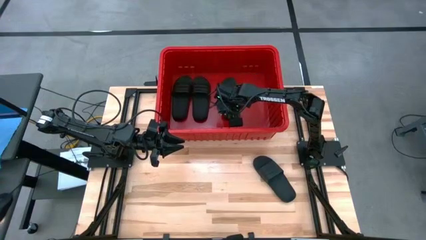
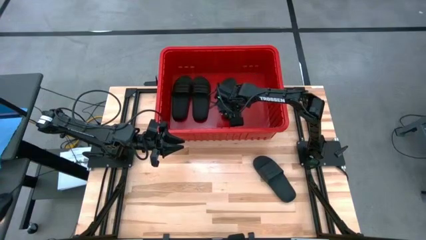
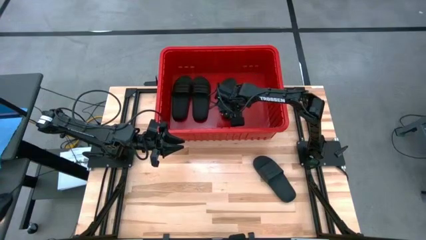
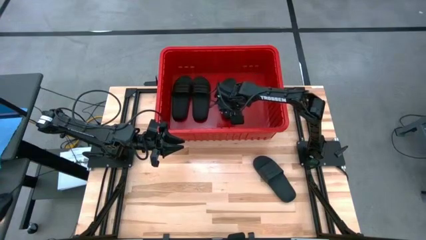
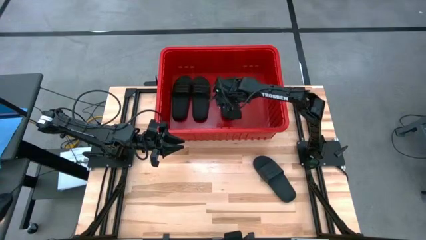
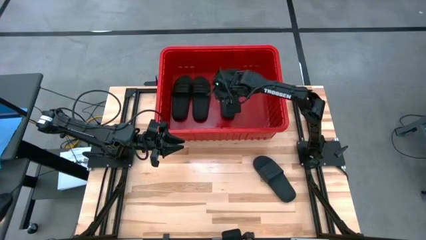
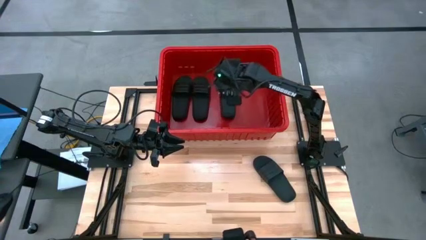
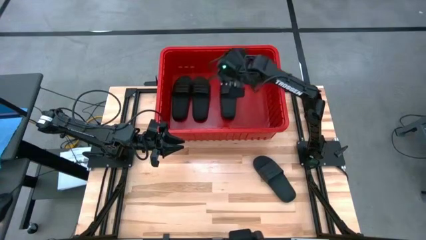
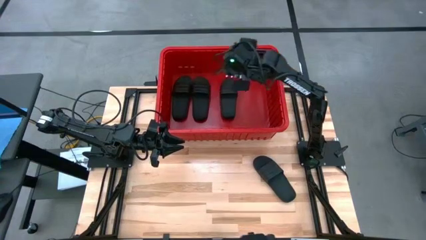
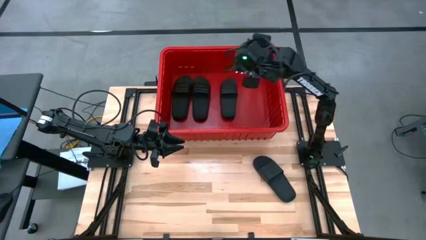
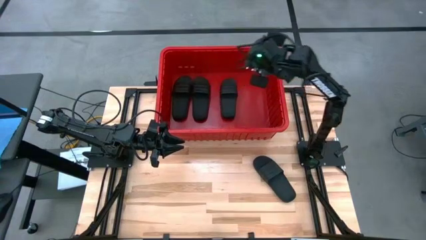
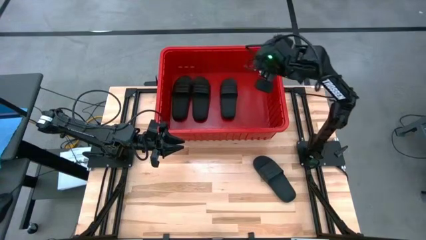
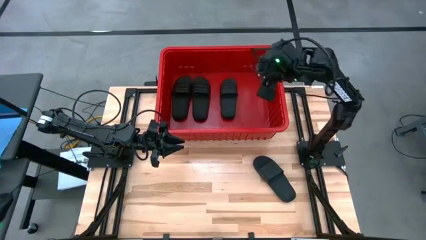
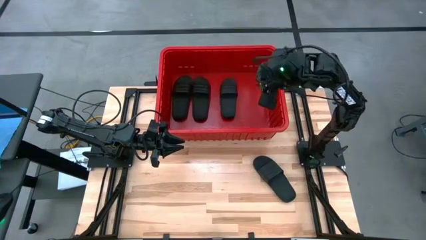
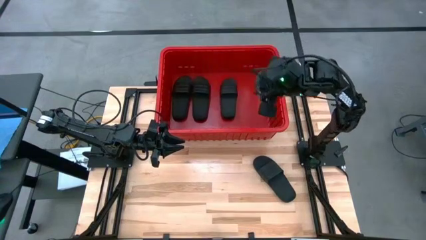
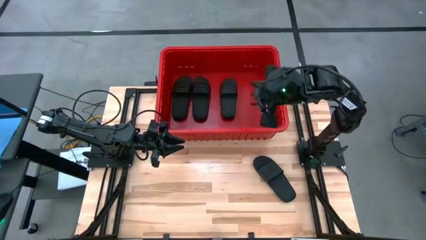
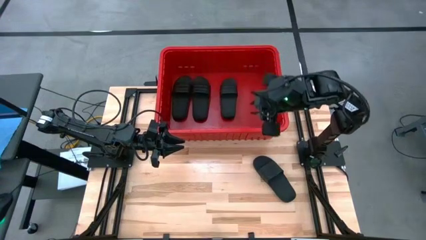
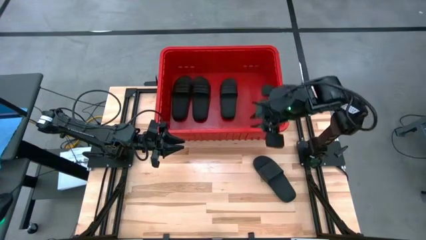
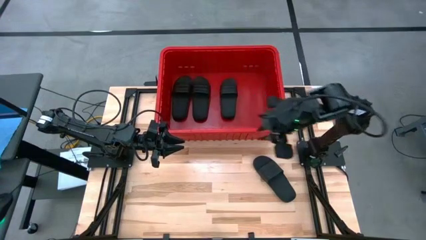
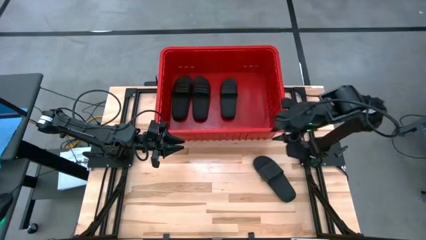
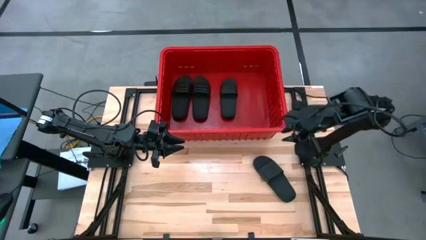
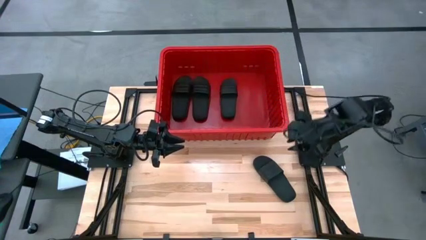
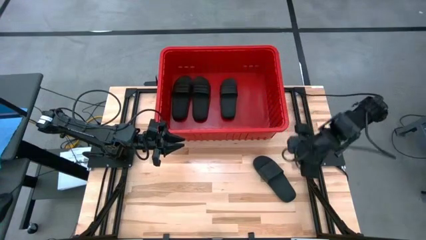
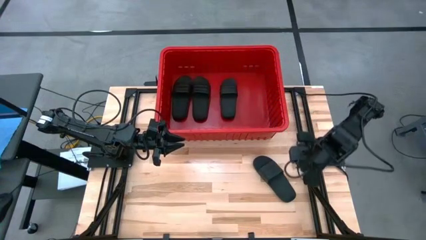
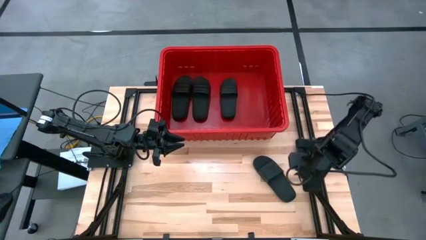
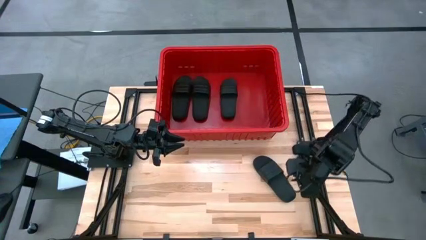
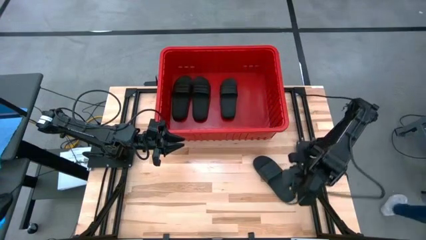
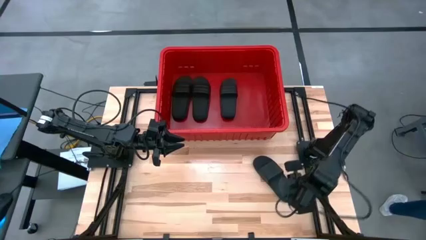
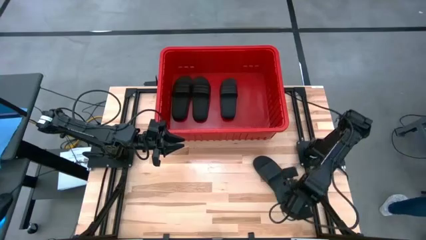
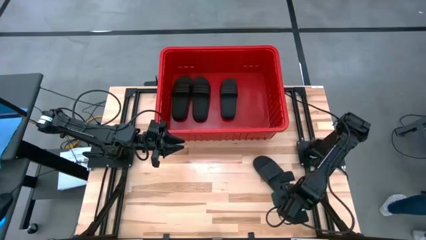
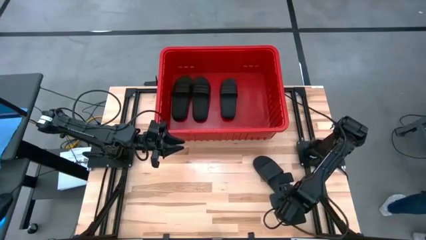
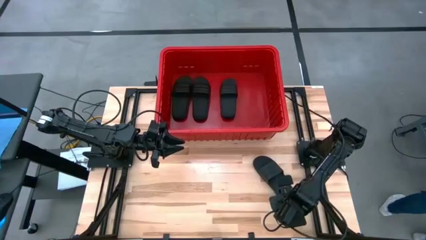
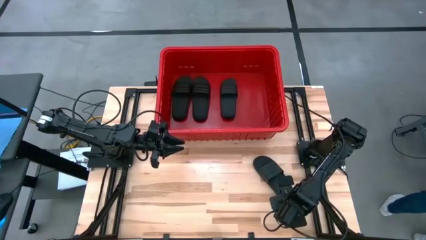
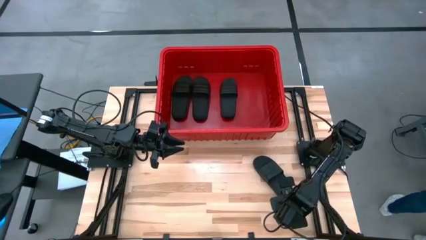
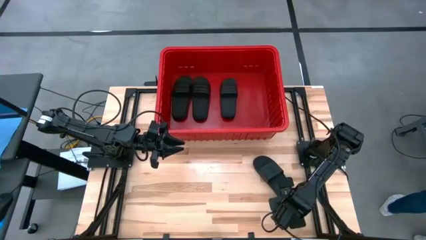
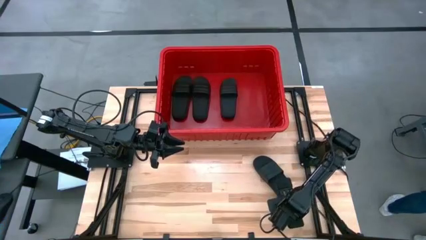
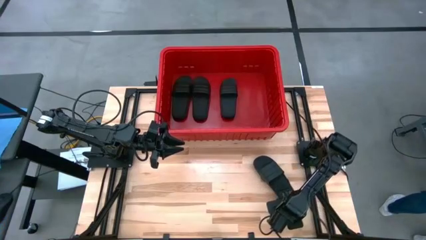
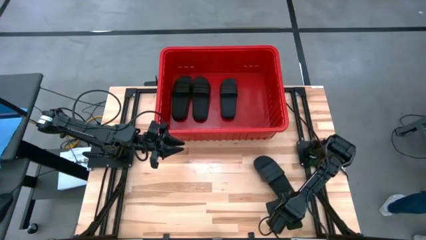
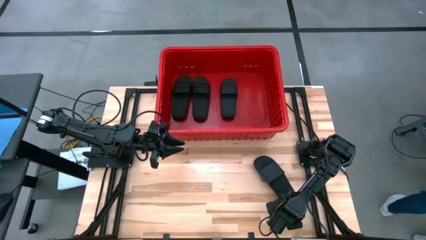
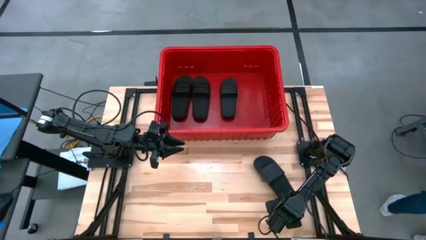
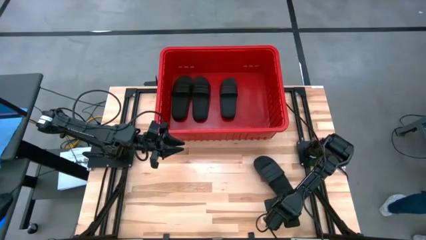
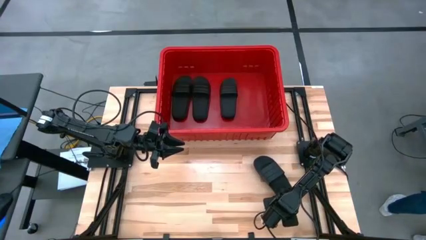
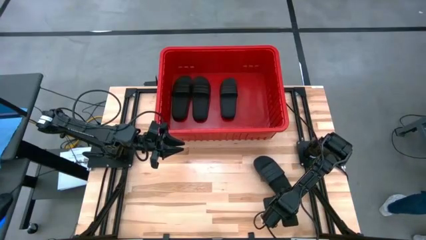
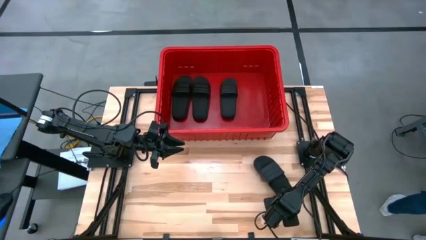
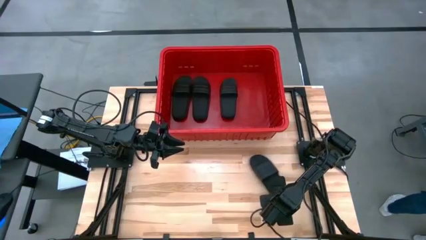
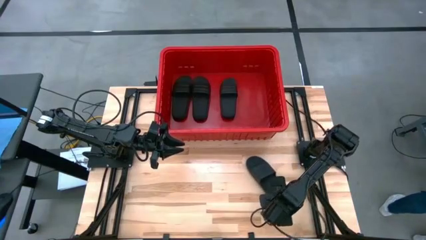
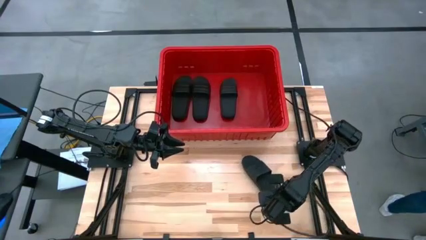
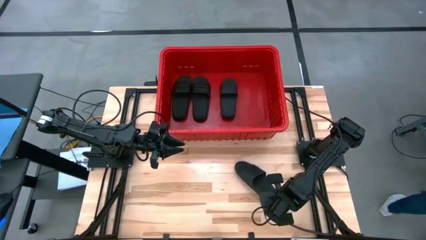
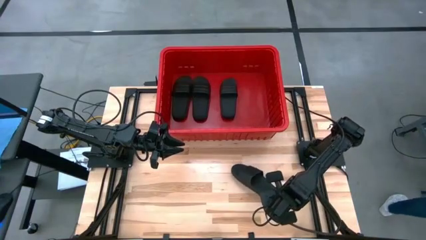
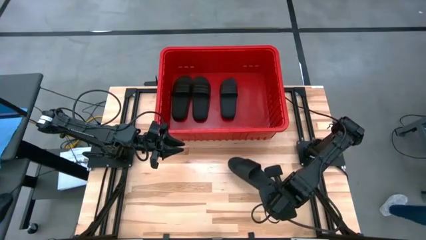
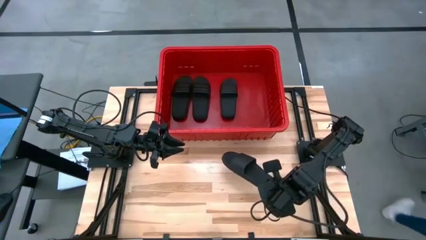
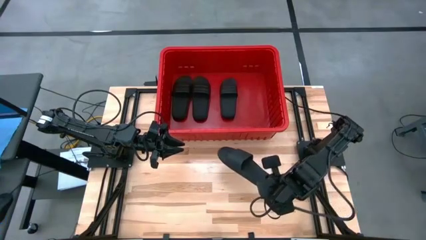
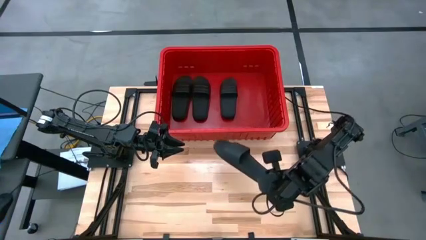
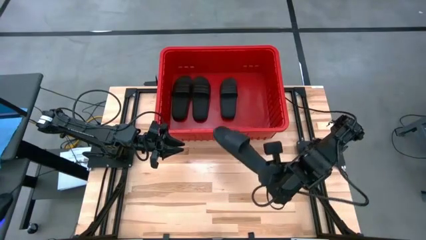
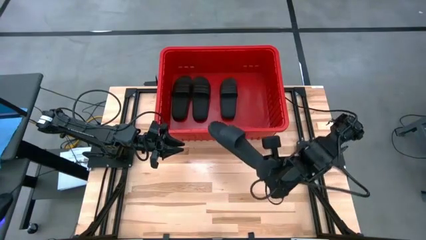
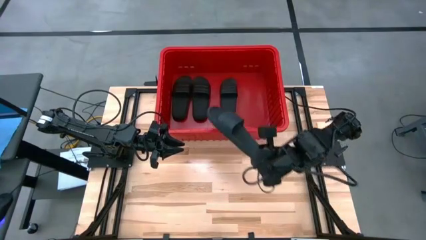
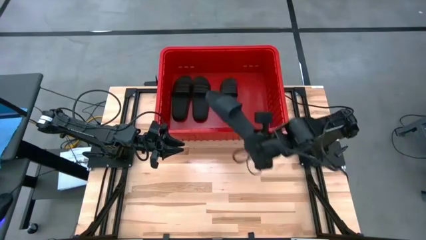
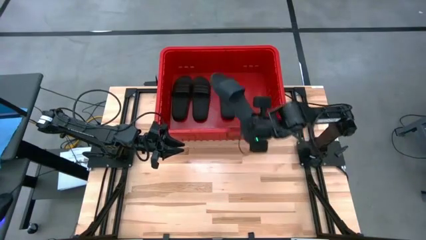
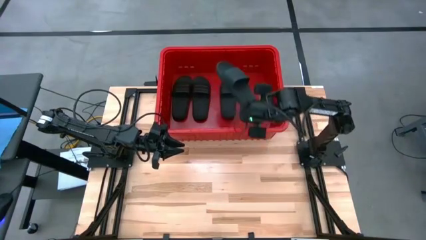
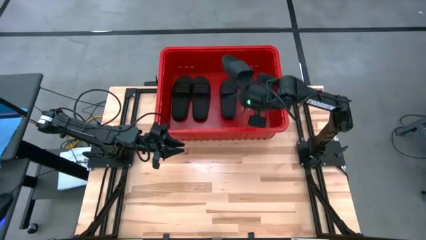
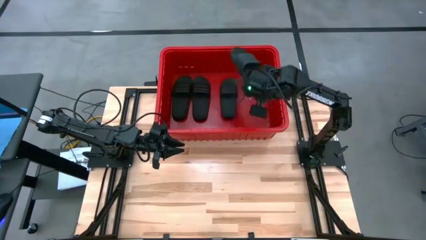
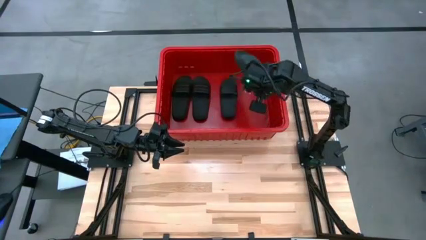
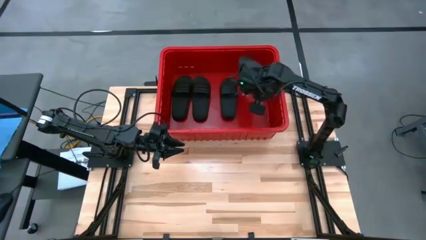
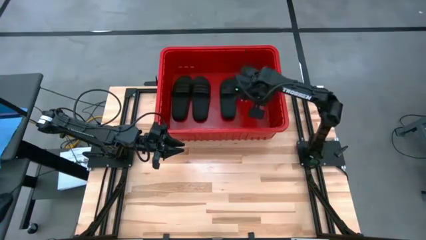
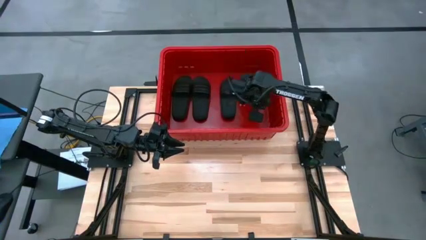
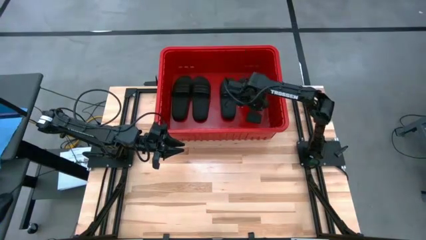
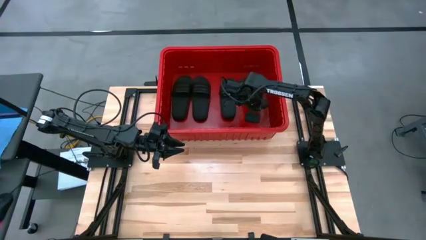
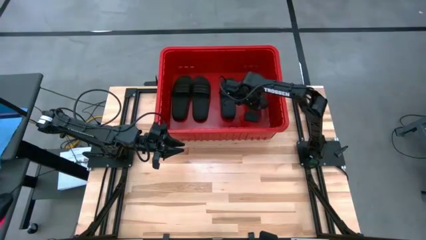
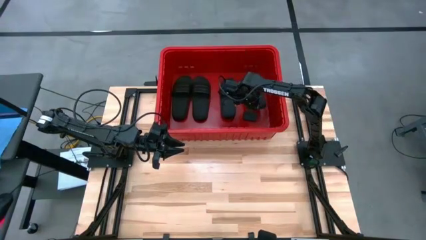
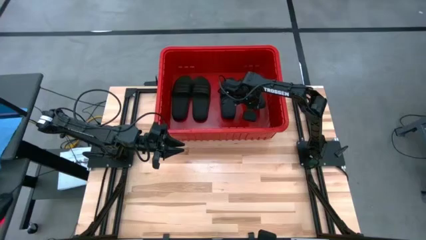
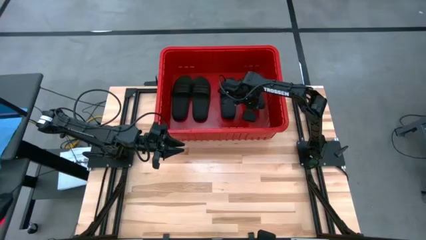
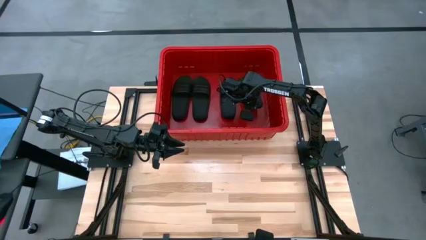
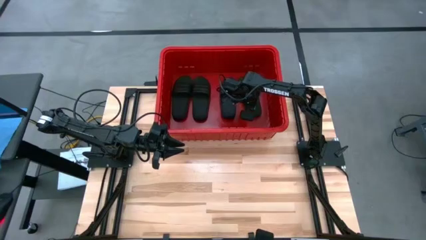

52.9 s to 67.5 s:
Task: Pick and place slides into bin
Put the black slide into the red container

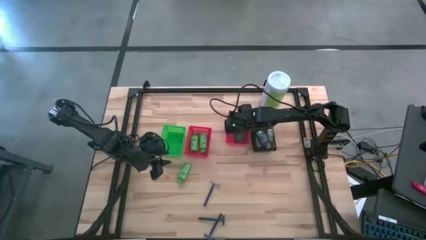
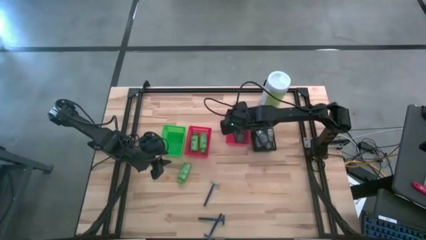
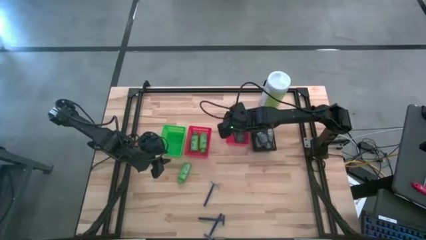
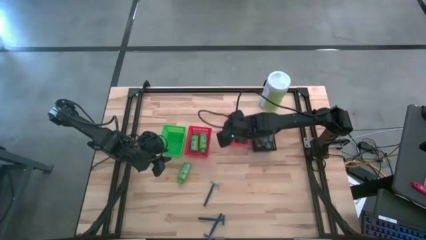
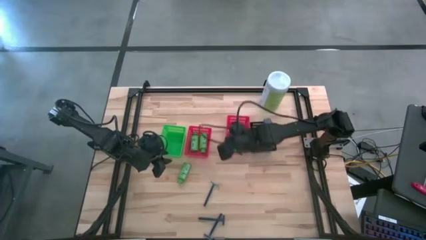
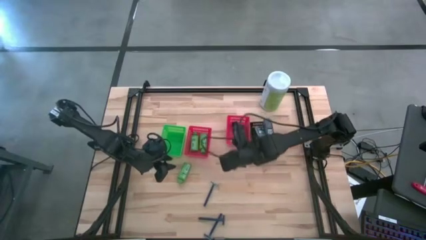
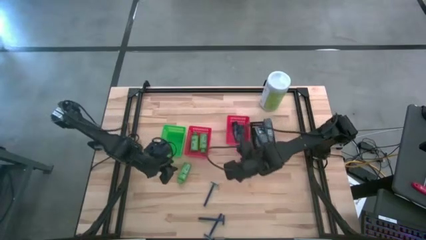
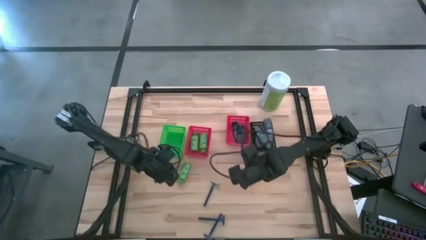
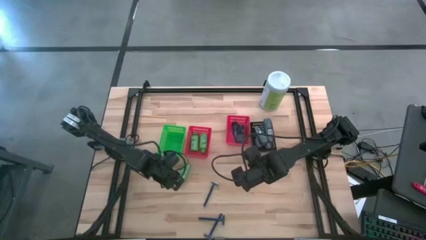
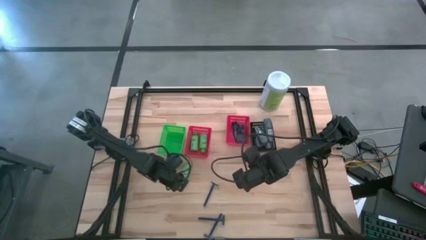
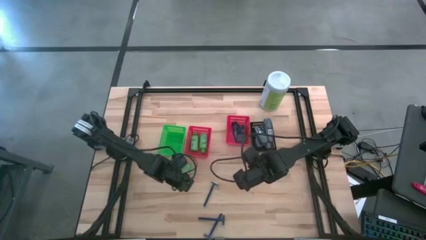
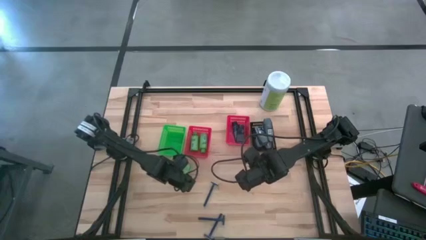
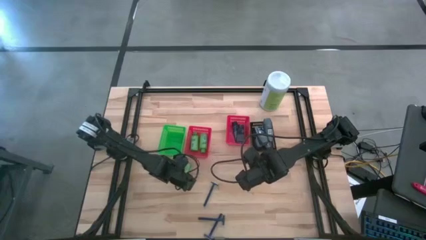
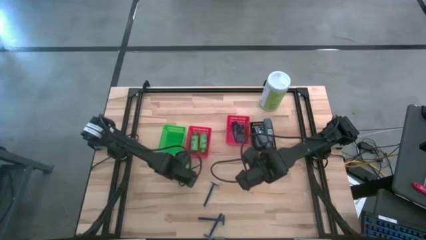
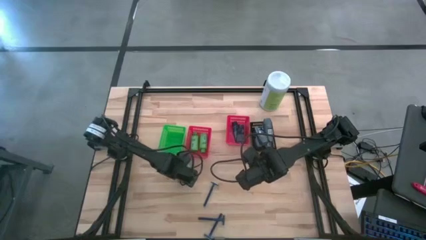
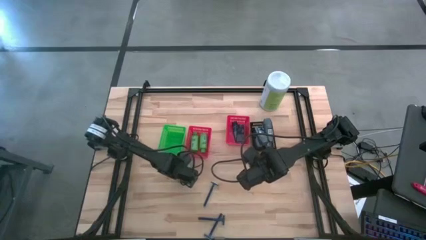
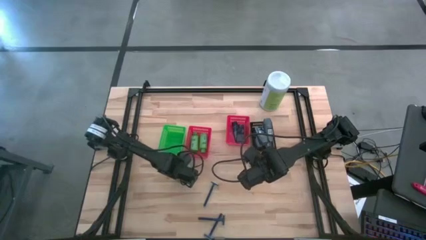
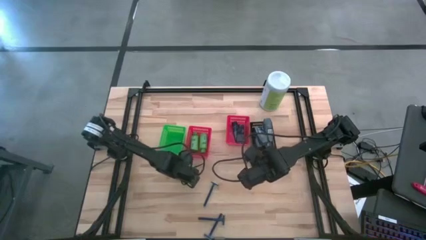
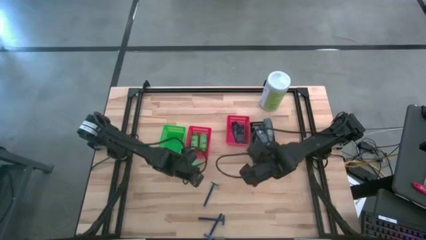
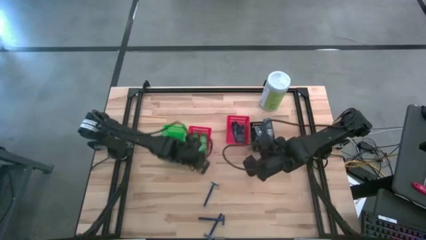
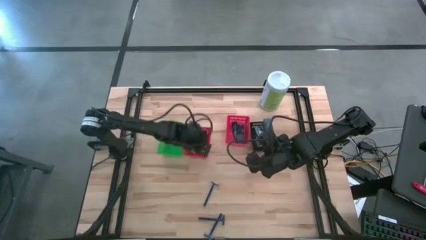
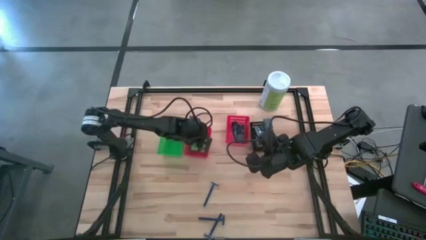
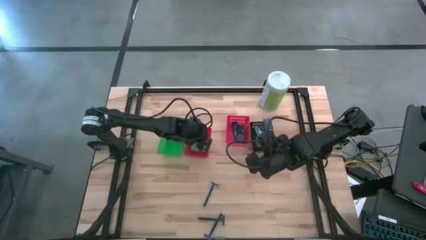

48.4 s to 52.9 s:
Task: Pick & Place Travel size toiletries
Put the green shampoo into the left red basket
